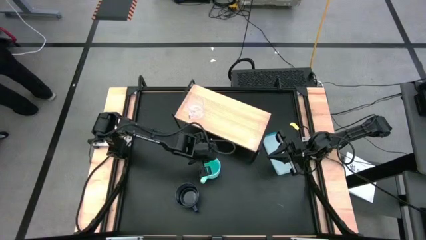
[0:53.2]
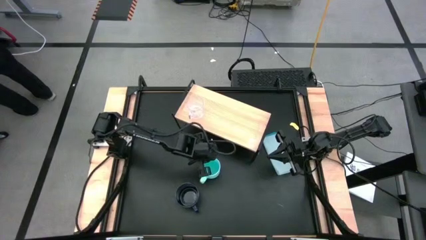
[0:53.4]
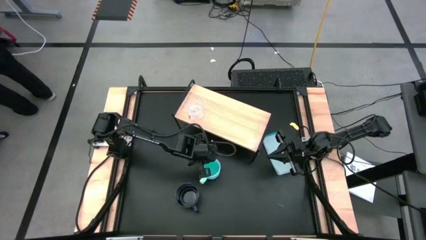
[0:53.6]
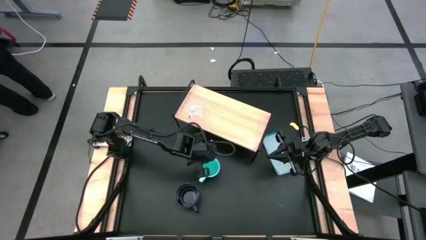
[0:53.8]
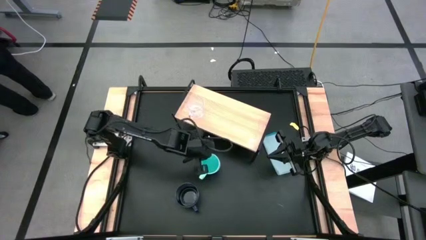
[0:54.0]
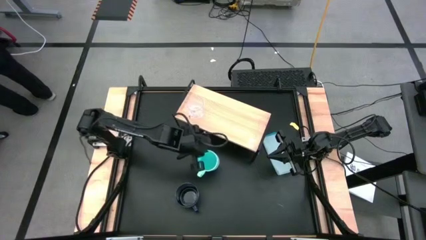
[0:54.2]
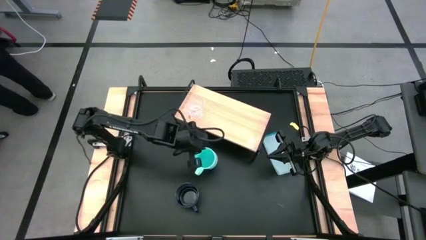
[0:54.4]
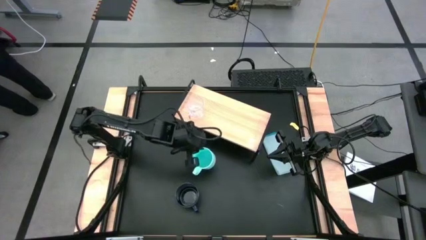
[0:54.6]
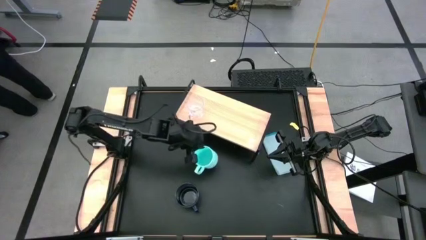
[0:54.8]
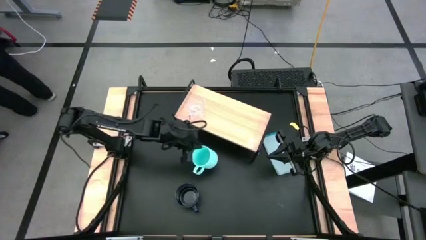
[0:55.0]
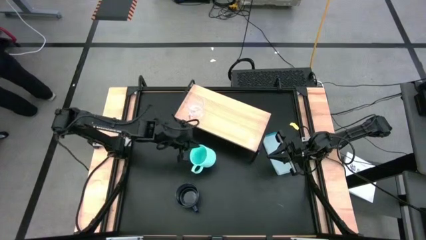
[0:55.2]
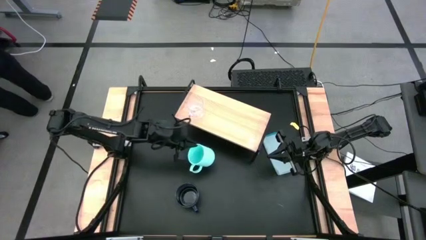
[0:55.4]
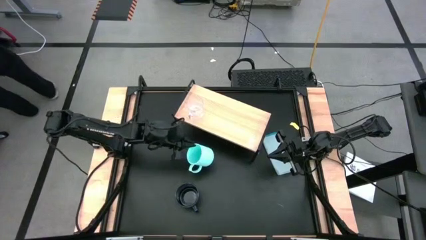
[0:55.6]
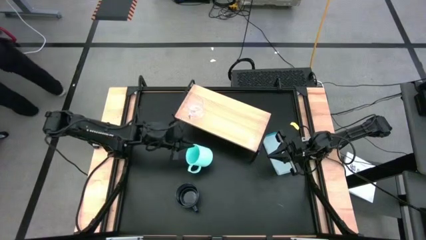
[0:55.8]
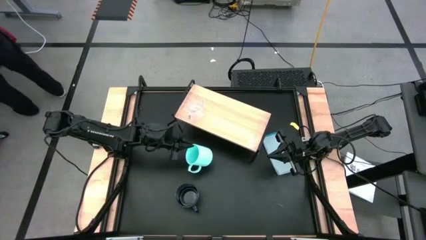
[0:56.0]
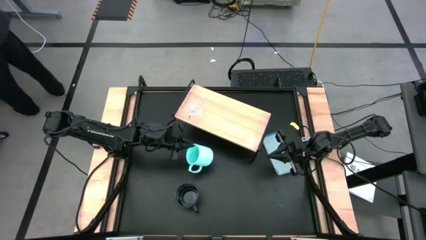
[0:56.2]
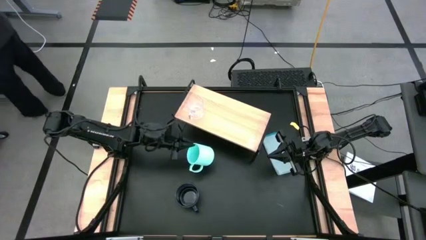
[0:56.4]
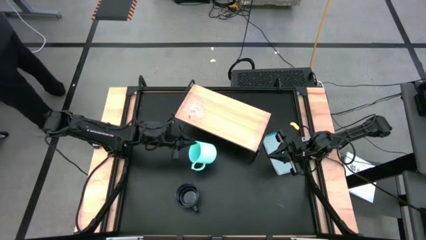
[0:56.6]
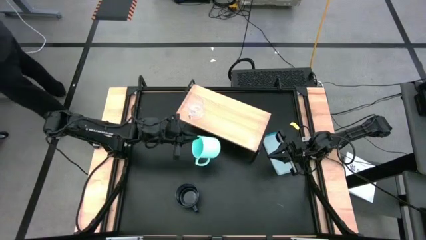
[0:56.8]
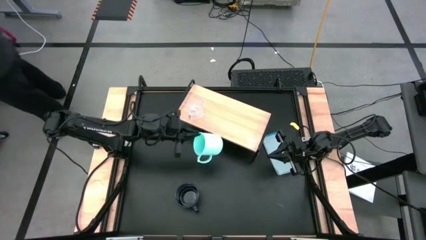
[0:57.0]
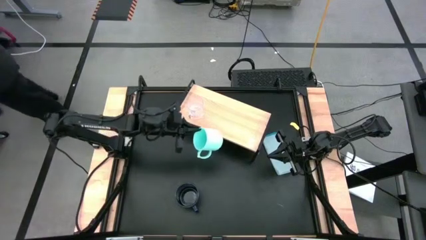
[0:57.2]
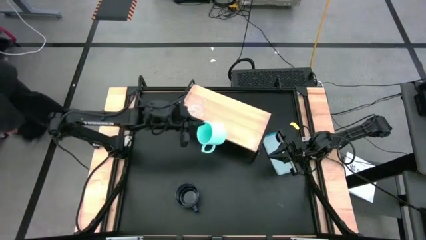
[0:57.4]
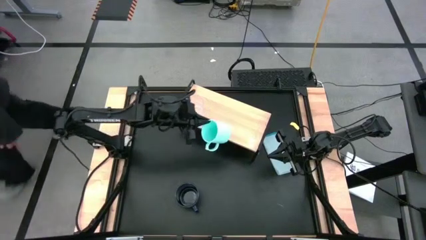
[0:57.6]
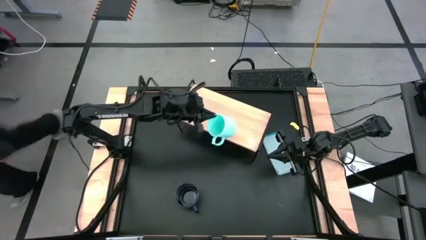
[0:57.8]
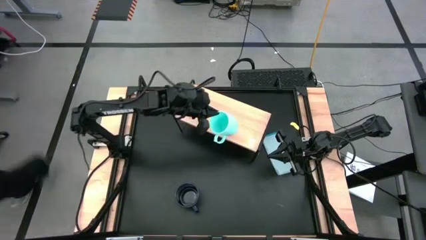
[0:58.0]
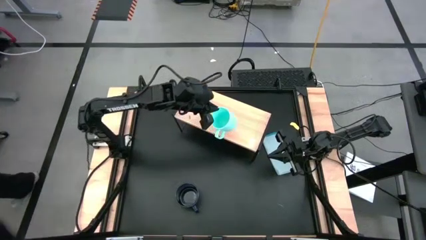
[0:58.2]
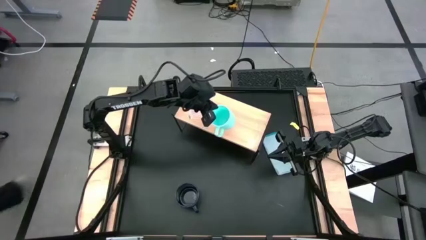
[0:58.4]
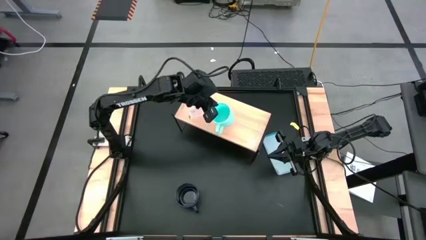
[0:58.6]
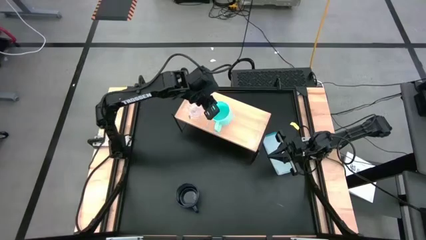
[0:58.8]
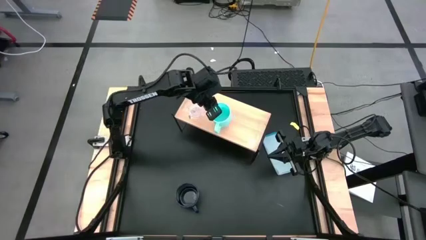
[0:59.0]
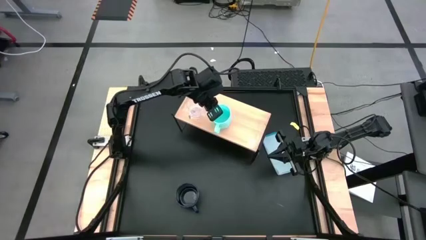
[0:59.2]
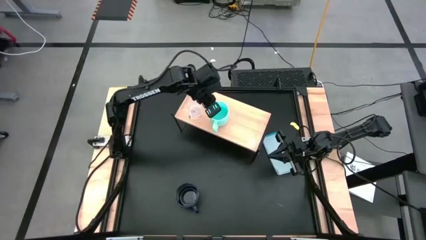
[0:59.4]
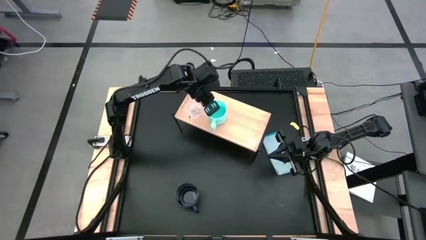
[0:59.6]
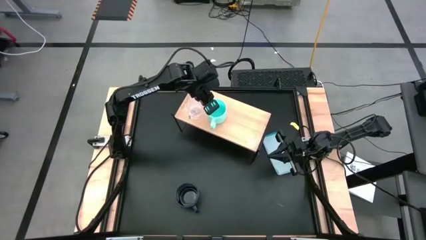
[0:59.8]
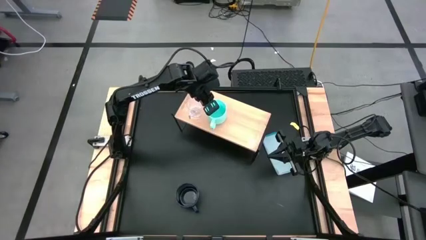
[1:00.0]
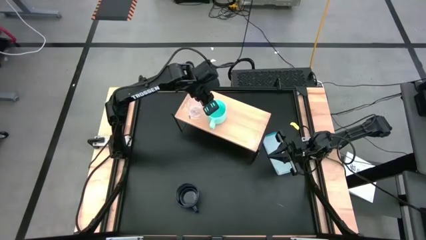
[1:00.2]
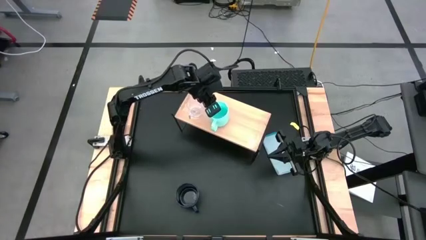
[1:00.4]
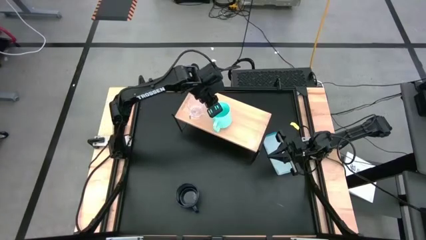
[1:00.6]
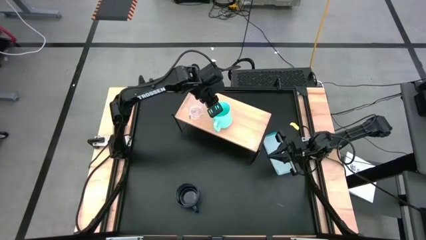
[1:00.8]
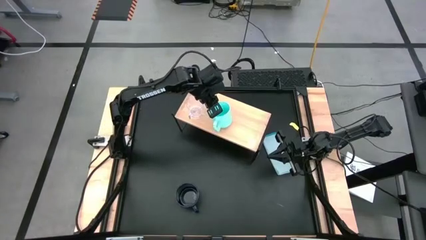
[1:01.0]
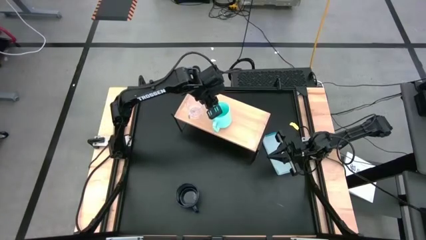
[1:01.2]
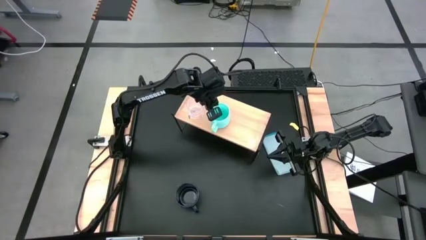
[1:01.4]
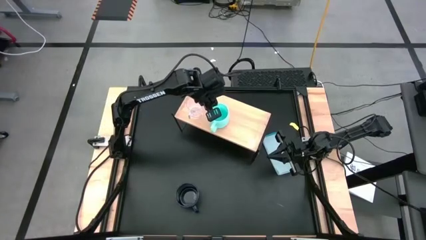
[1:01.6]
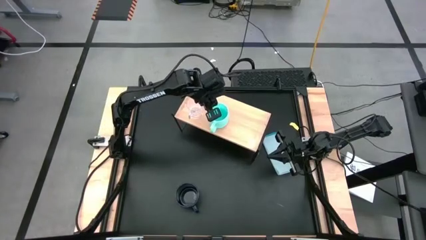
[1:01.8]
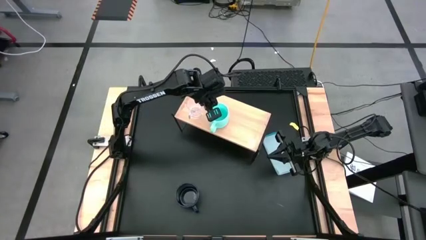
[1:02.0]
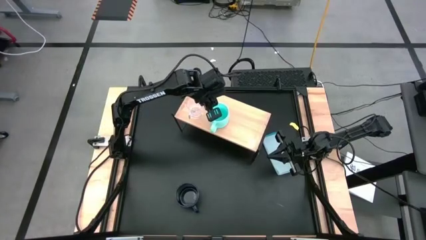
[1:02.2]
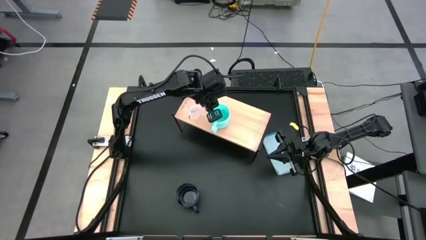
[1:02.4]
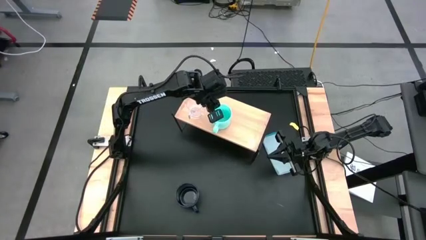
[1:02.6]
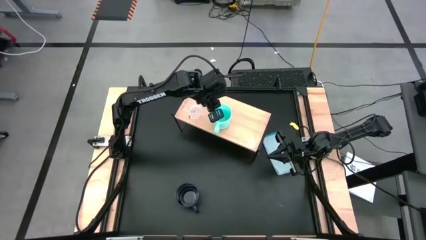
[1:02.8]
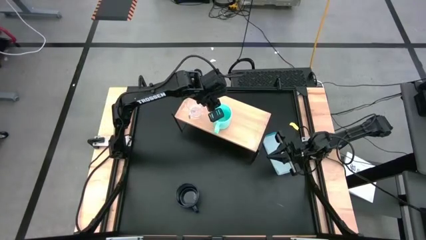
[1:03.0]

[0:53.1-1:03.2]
Task: Stack small to large cups/mugs on shelf
Put the light blue mug on the shelf
